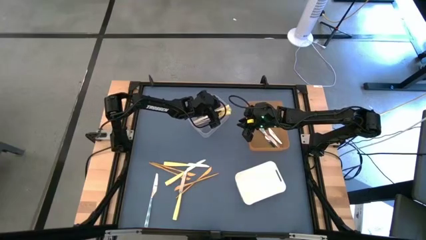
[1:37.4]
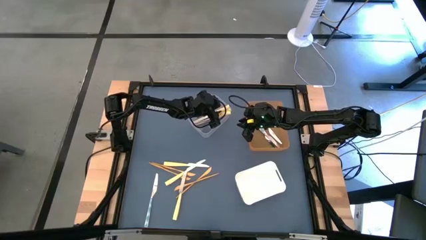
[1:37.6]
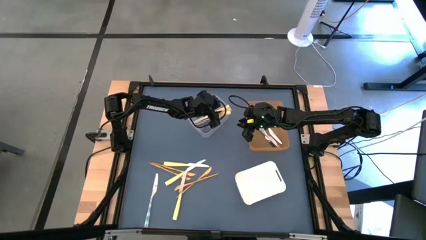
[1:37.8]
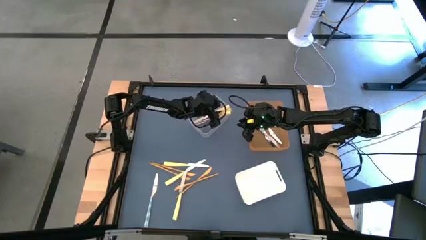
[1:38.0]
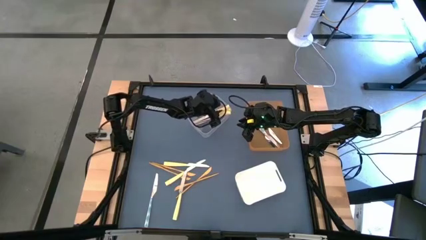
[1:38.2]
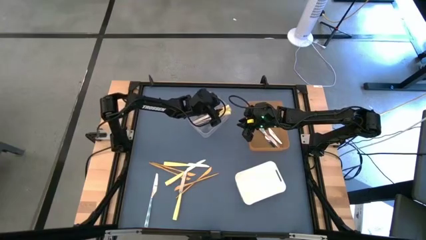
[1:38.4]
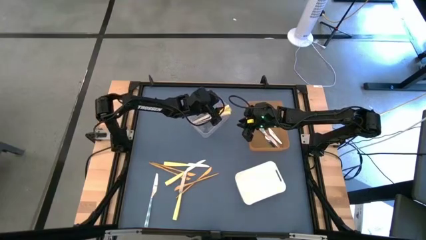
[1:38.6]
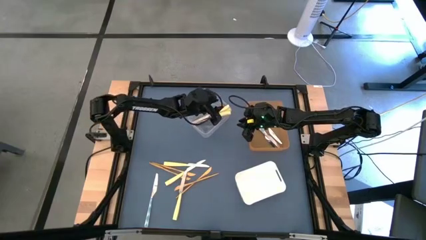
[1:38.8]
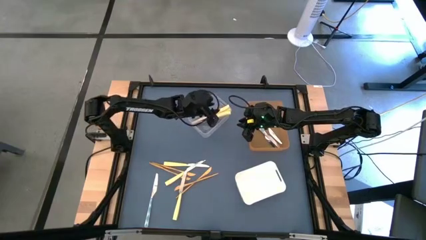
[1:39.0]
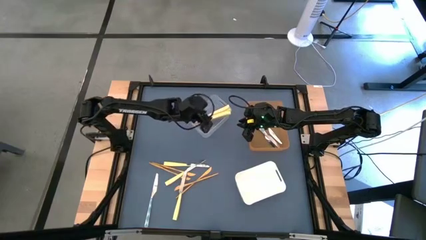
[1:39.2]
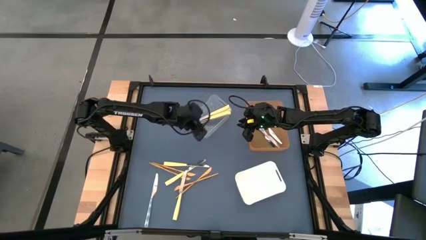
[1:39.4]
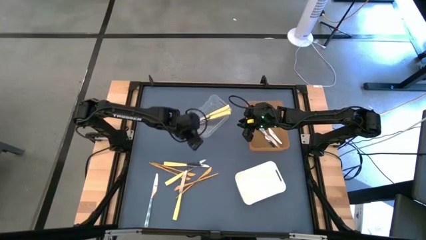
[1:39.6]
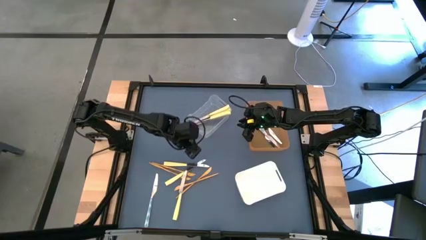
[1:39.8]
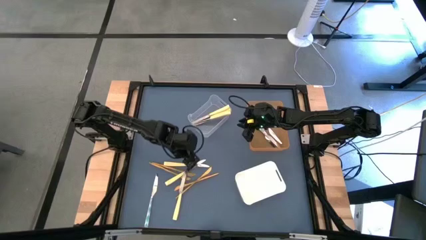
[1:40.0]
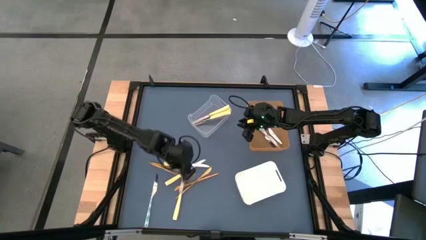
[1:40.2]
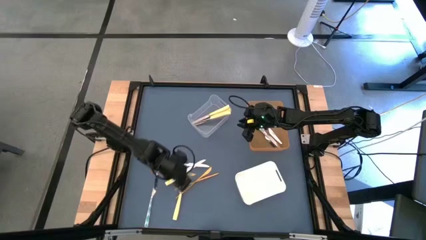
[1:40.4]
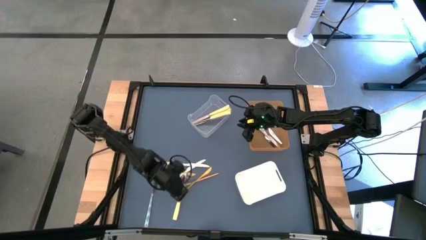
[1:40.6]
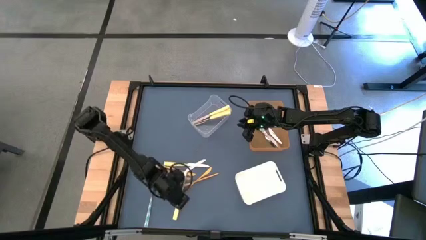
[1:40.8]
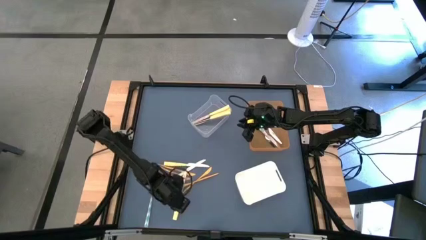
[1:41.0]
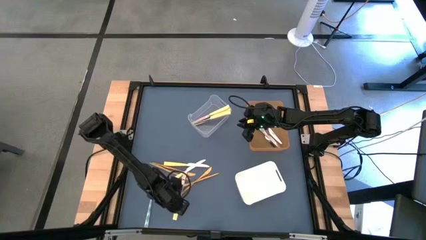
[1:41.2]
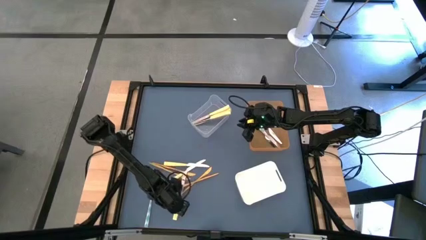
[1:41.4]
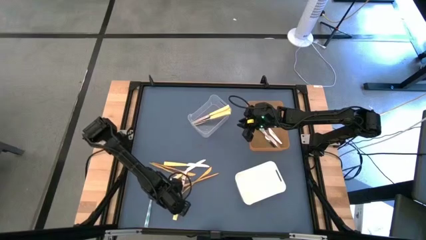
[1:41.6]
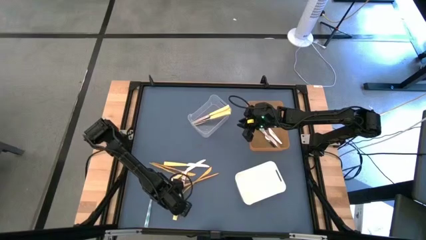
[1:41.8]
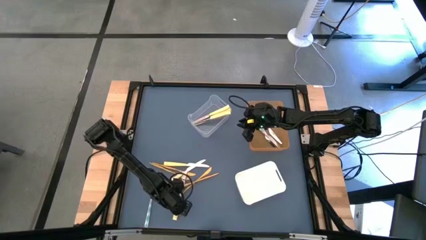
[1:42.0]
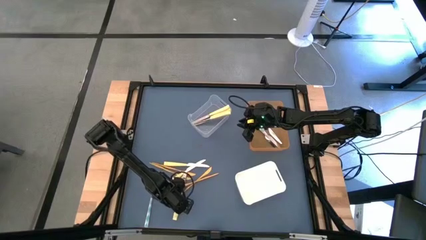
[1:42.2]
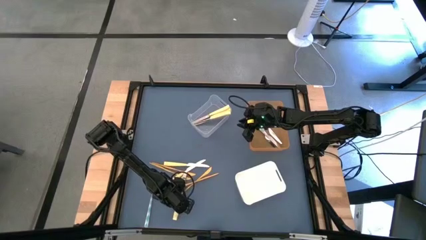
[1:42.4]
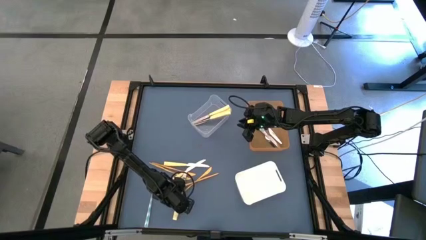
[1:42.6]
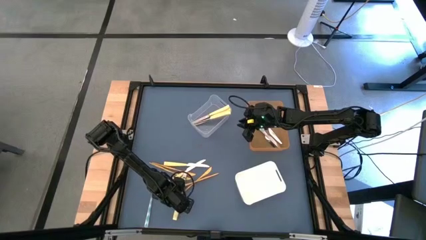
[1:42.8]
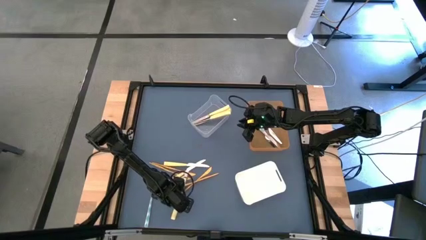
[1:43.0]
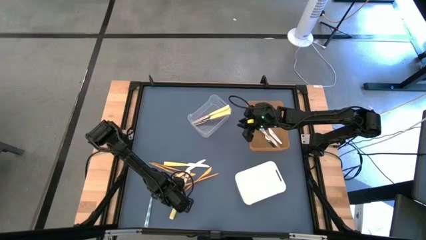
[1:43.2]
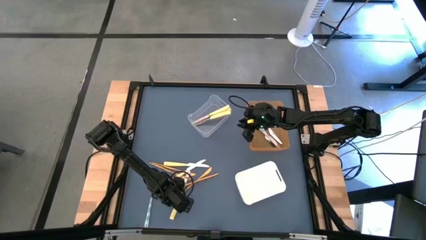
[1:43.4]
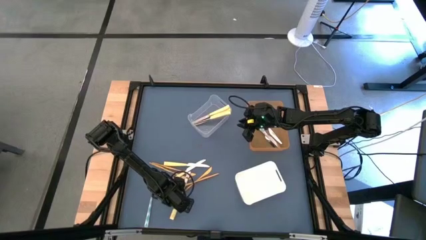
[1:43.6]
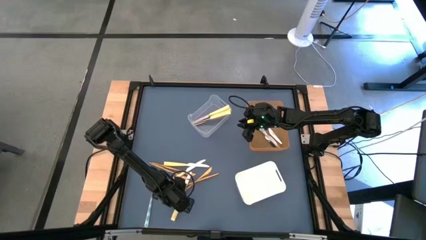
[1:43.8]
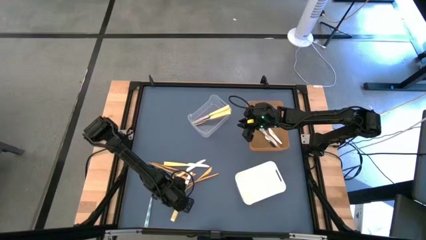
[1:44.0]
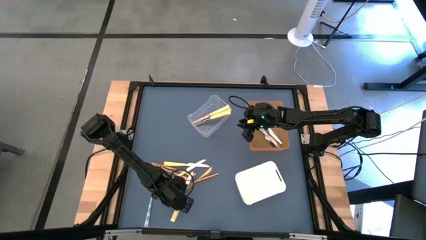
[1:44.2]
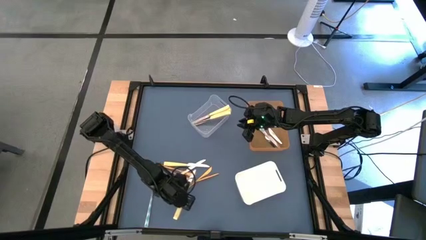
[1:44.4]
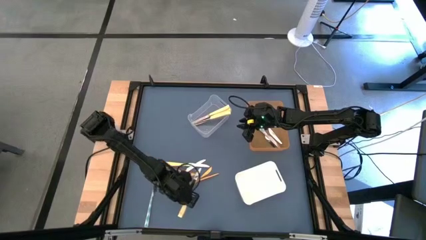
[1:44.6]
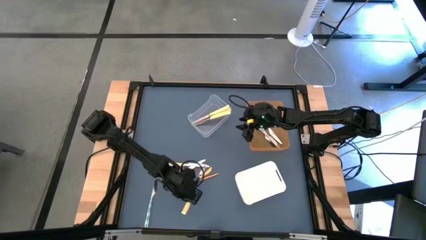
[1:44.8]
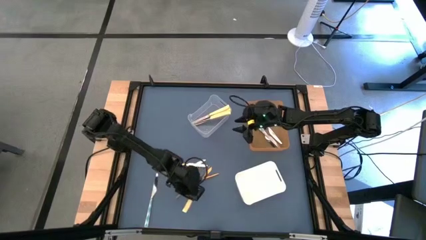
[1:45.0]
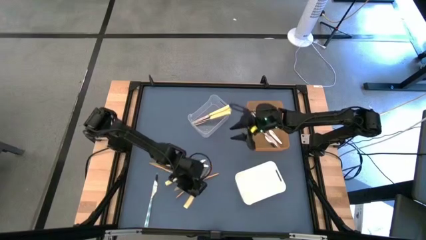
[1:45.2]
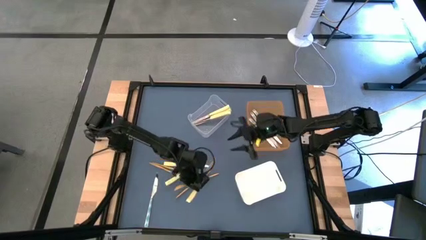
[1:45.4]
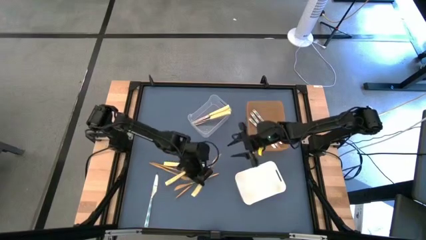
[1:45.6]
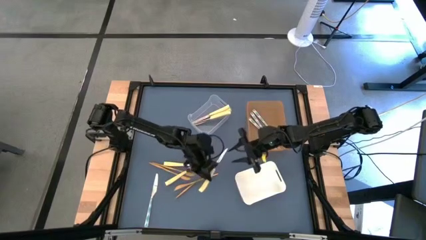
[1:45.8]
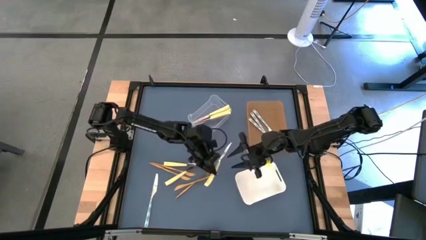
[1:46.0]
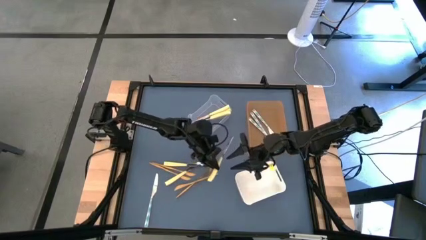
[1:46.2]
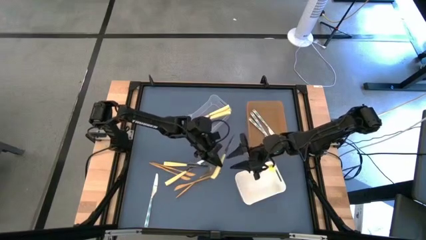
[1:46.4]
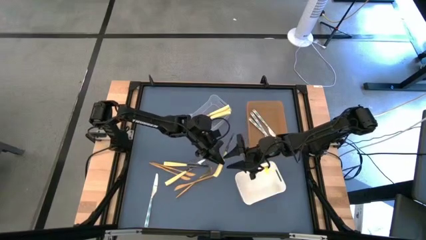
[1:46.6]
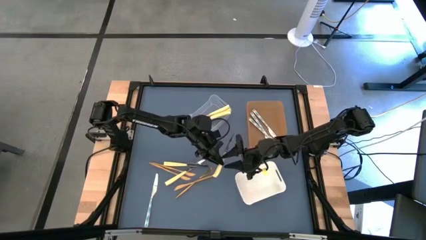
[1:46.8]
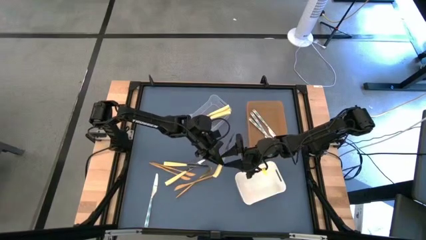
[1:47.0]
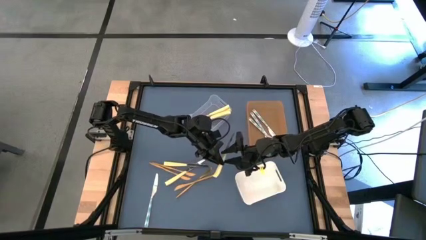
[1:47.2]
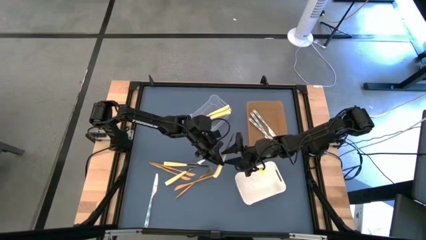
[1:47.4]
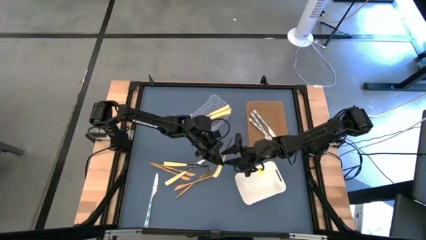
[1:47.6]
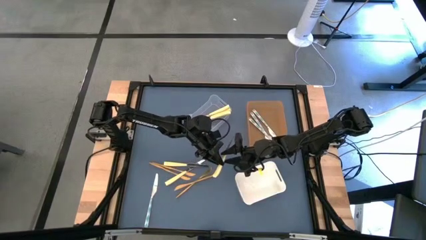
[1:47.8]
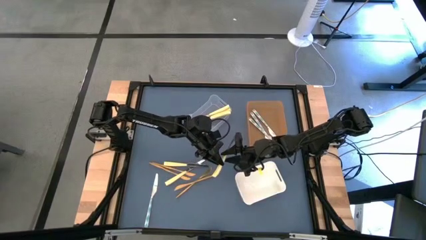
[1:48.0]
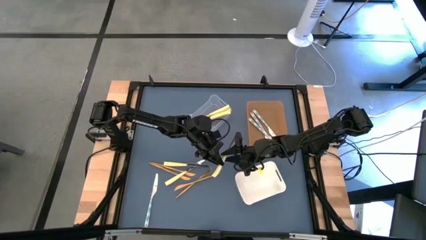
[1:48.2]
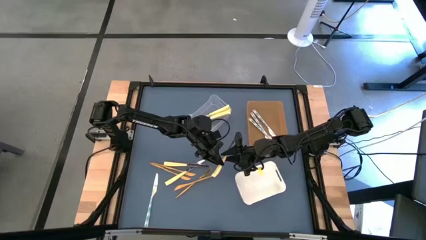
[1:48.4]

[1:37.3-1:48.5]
Task: Sort silverware by color (type)
Put the yellow knife into the transparent bin
